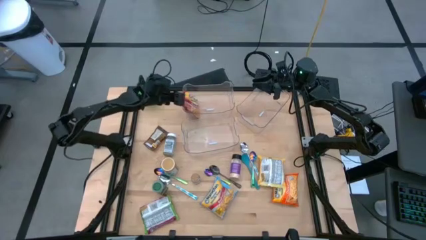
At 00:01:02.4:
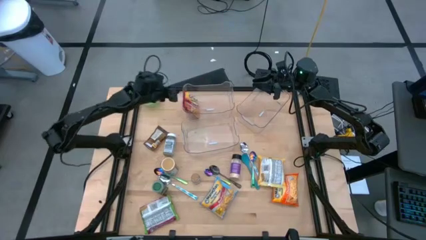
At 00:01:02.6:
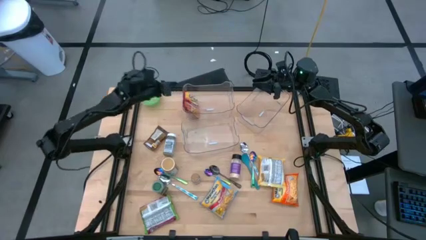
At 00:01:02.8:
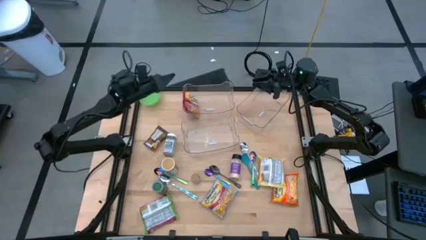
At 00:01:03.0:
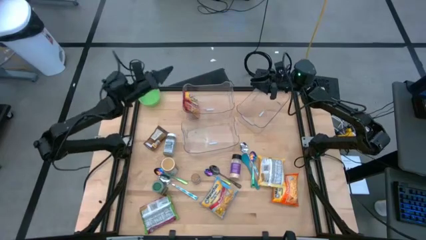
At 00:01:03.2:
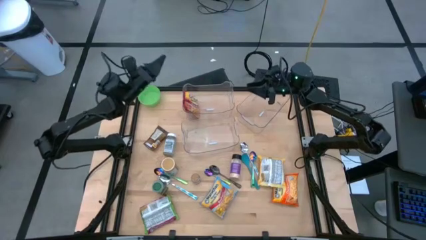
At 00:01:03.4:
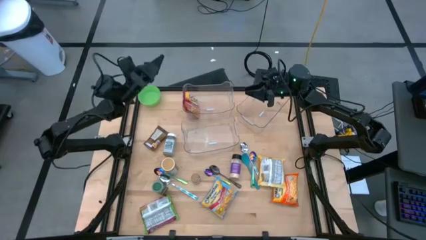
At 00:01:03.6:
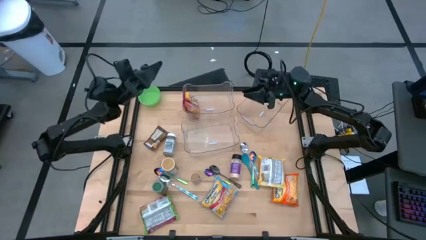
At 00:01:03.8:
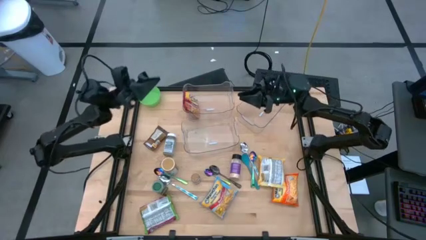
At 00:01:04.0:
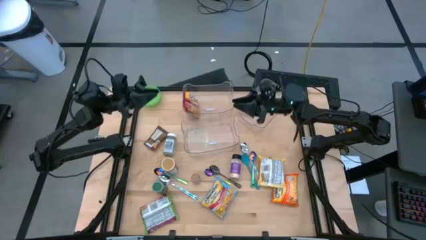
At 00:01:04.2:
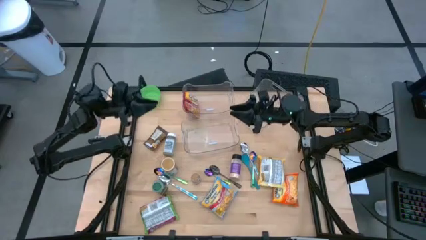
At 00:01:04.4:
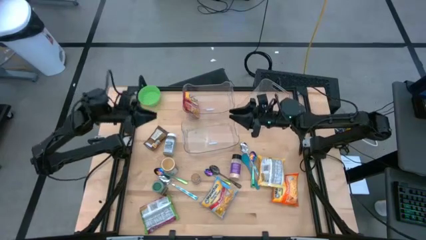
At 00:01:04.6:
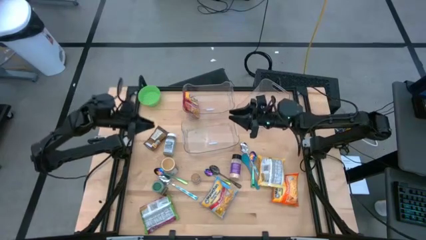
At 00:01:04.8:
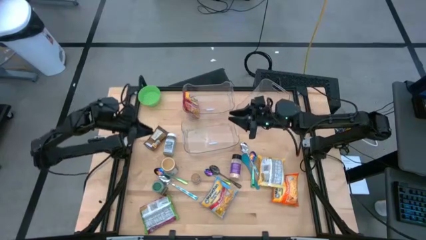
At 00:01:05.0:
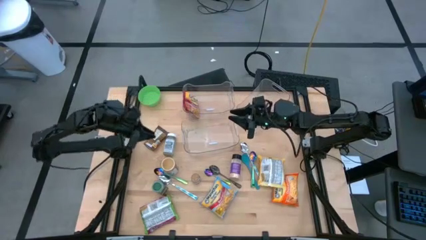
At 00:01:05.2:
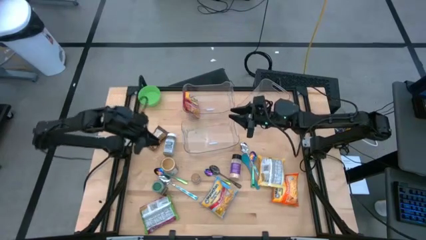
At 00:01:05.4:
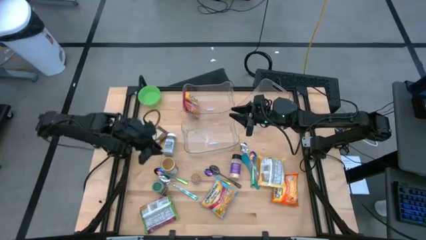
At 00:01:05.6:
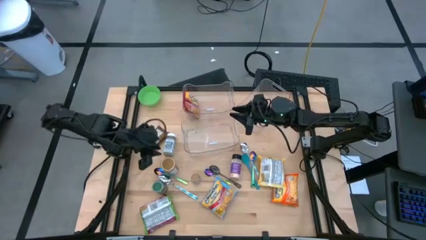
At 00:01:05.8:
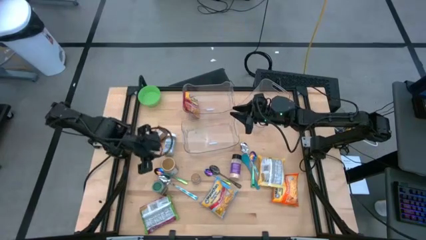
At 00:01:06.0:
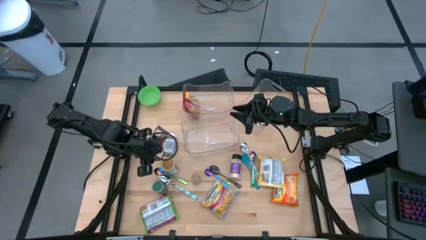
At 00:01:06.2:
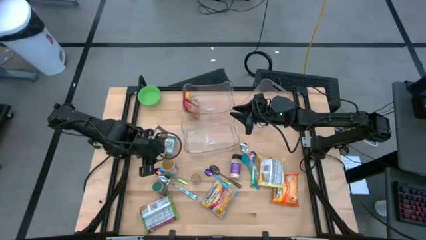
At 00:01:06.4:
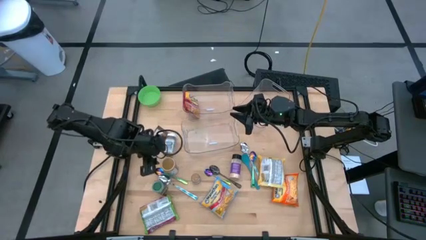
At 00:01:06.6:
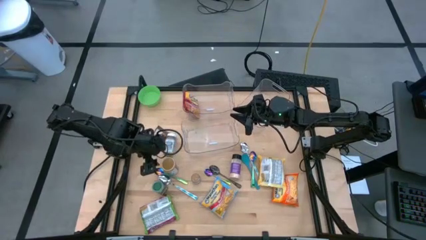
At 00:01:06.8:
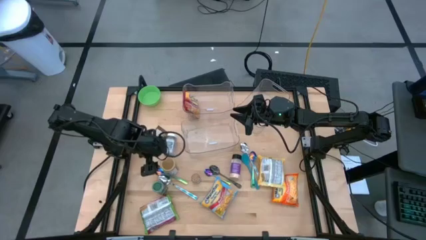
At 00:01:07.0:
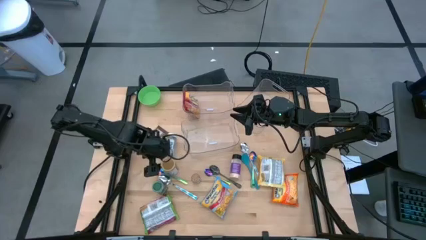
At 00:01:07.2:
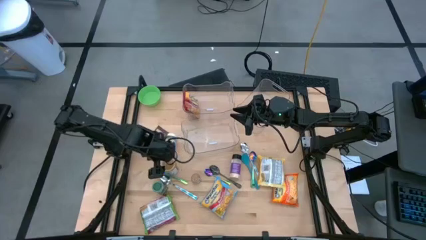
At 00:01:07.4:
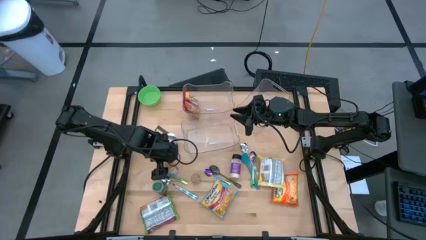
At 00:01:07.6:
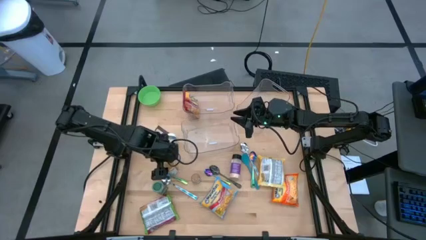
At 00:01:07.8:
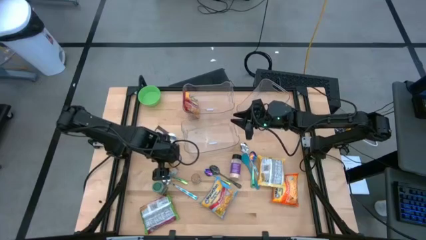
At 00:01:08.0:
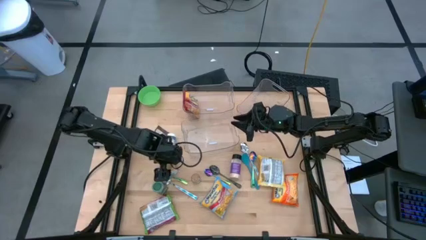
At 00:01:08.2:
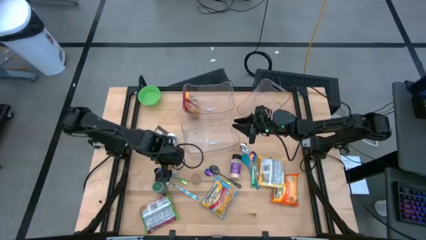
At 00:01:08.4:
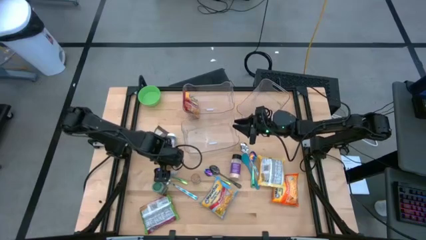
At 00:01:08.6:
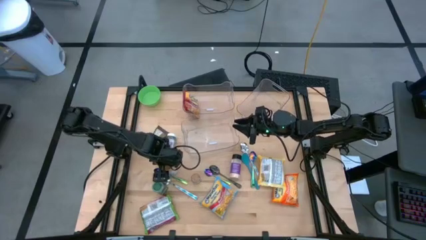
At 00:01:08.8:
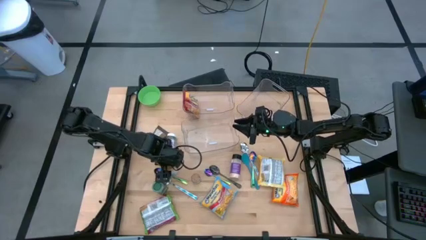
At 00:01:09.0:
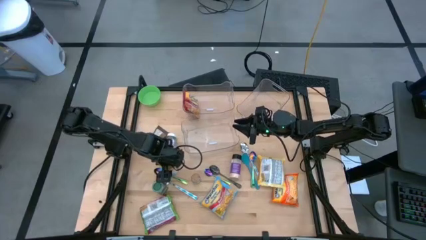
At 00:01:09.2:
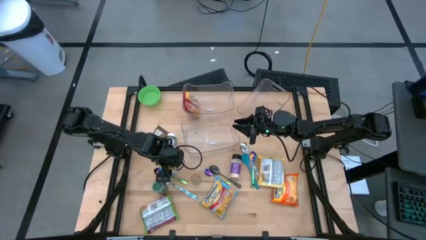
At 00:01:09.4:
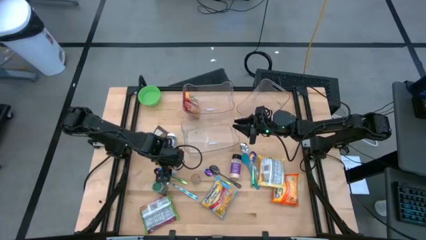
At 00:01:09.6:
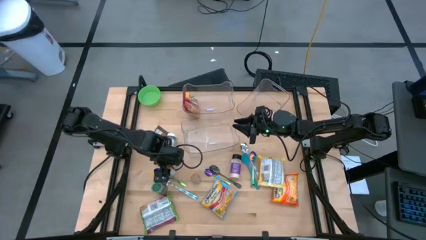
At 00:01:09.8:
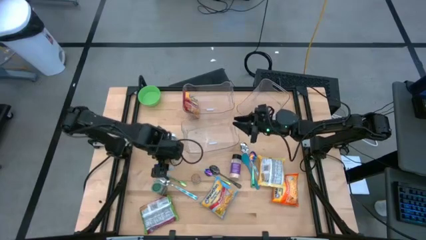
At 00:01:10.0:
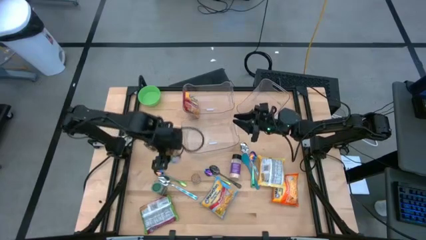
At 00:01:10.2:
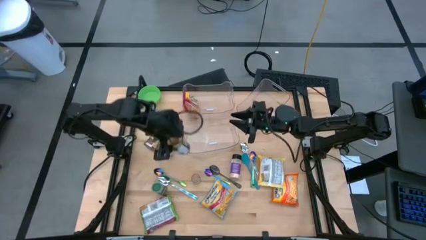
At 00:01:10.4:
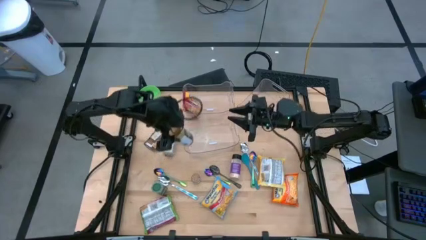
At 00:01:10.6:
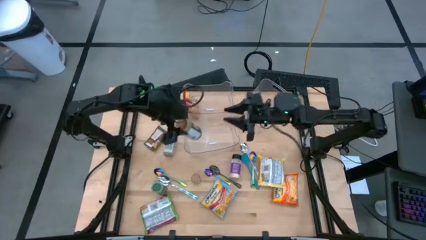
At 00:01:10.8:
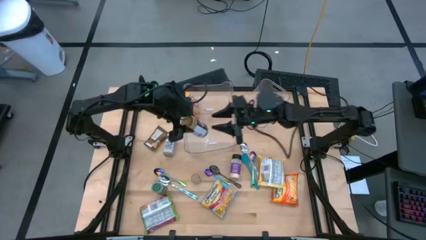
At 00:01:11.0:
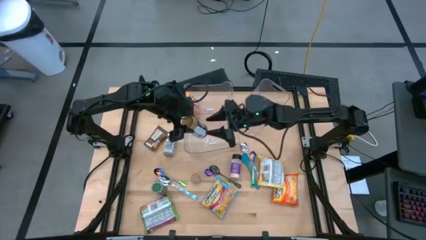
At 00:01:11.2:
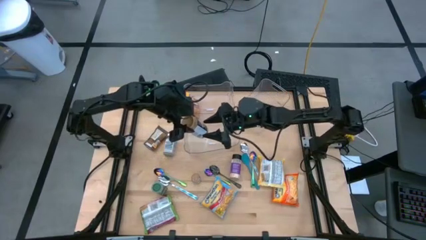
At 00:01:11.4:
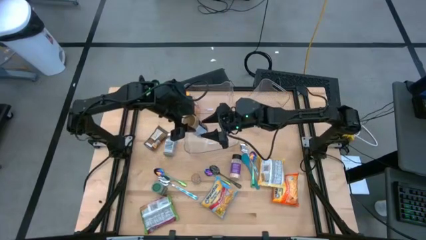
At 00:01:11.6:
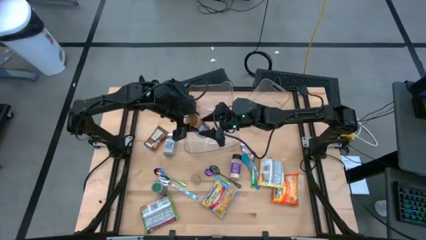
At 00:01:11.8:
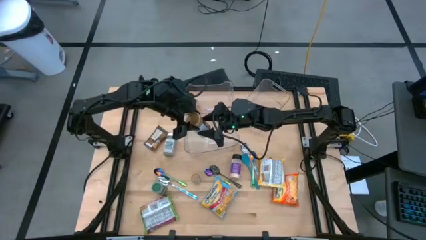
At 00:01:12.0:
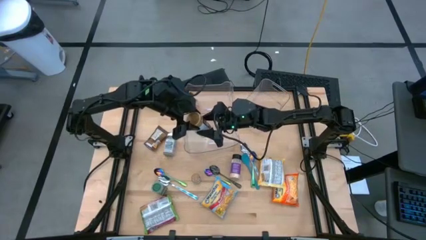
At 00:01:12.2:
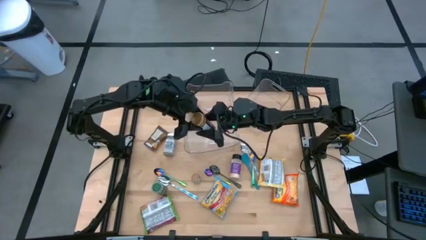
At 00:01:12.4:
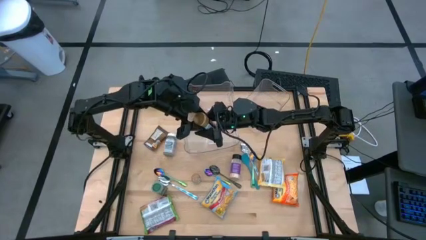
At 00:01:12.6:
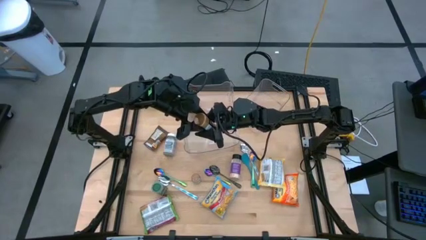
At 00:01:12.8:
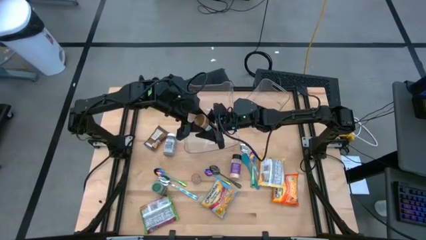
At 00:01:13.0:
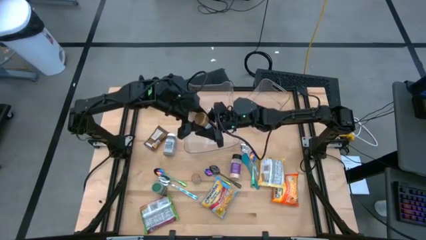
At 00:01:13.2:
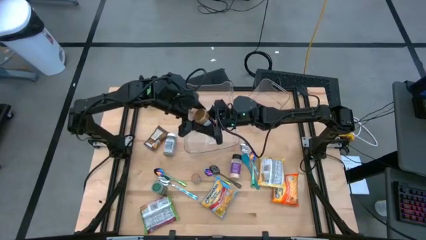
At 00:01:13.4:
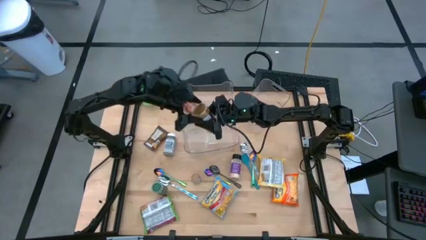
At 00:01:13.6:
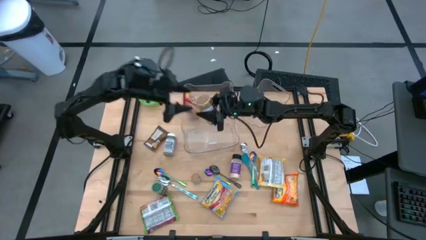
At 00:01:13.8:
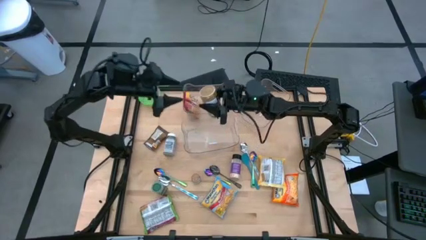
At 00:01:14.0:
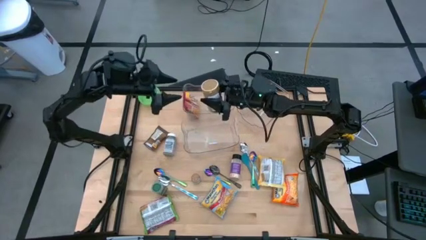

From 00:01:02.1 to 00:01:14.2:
Task: Pick & Place Food Item
Put the gold seasoning bottle into the top right transparent bin
